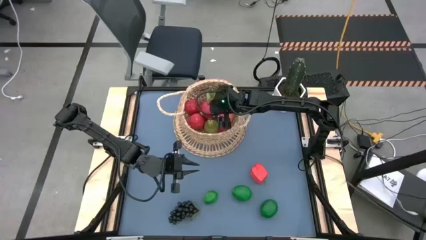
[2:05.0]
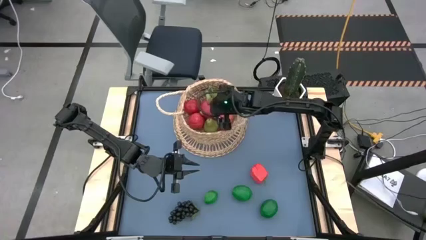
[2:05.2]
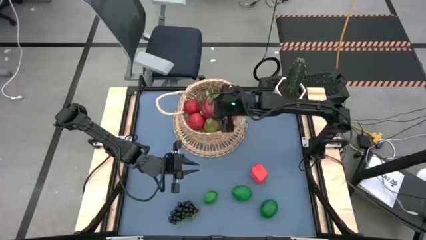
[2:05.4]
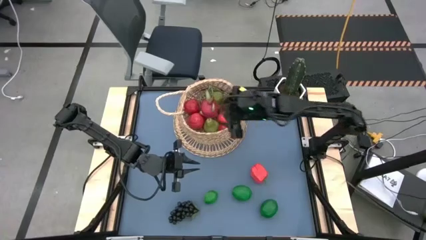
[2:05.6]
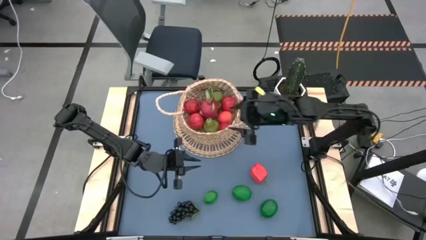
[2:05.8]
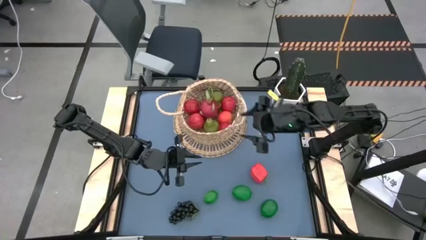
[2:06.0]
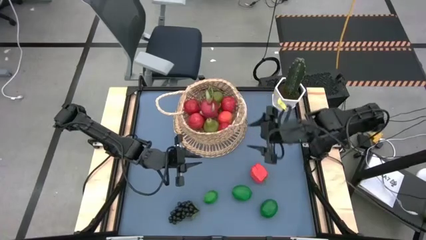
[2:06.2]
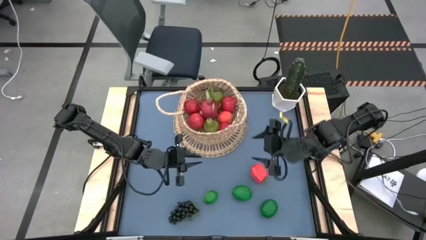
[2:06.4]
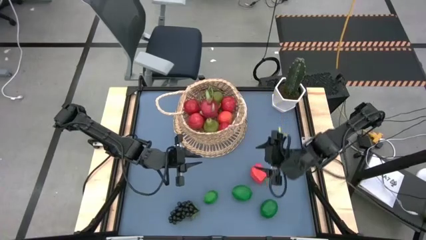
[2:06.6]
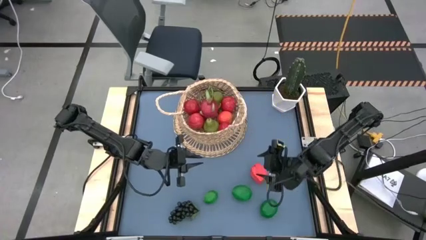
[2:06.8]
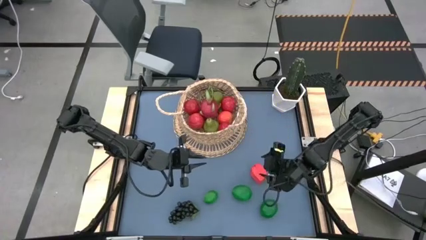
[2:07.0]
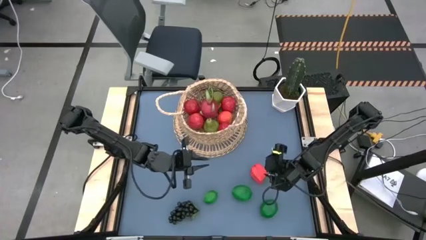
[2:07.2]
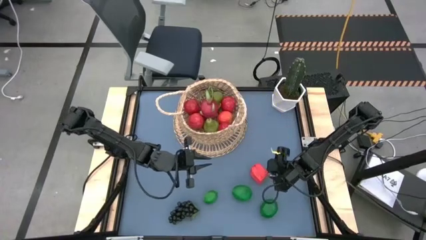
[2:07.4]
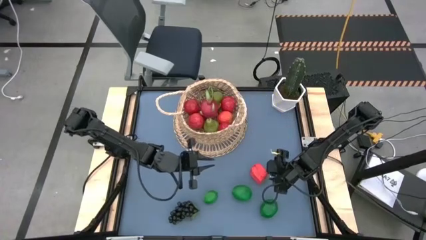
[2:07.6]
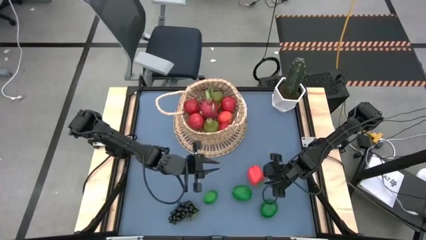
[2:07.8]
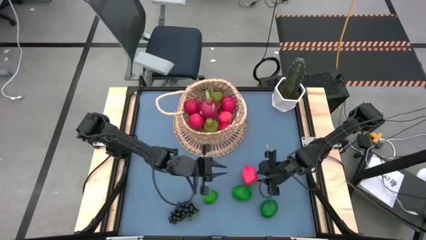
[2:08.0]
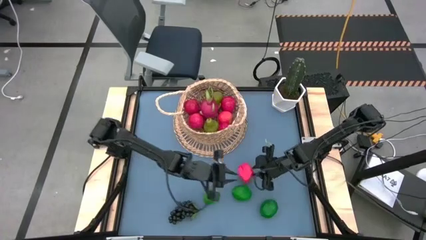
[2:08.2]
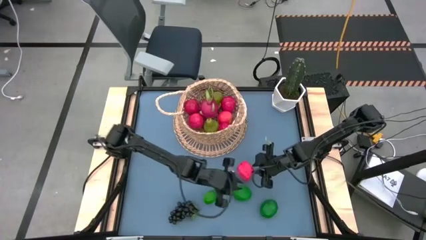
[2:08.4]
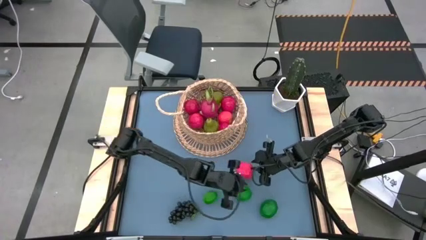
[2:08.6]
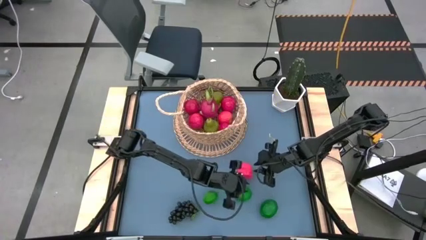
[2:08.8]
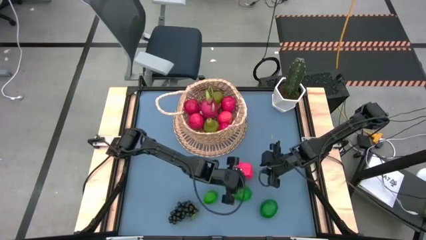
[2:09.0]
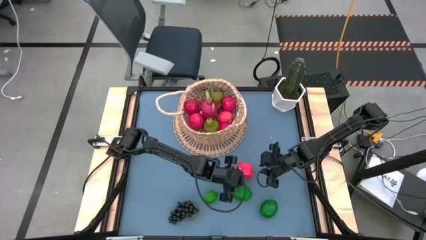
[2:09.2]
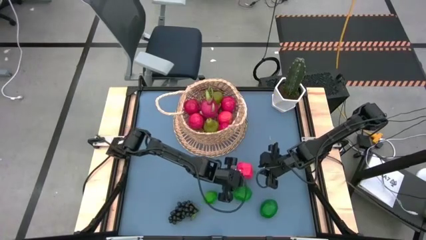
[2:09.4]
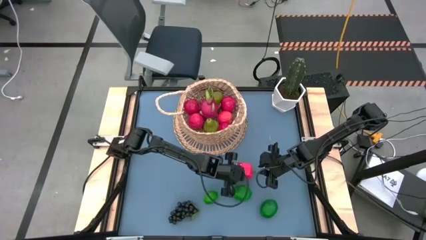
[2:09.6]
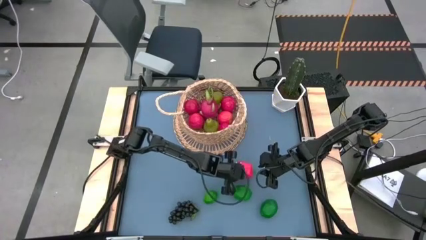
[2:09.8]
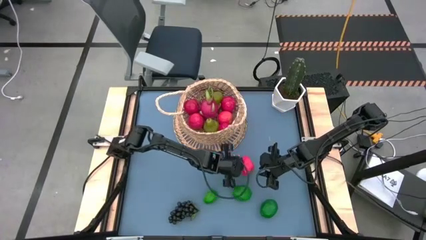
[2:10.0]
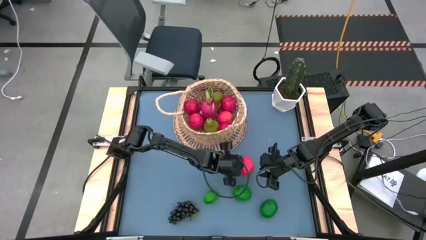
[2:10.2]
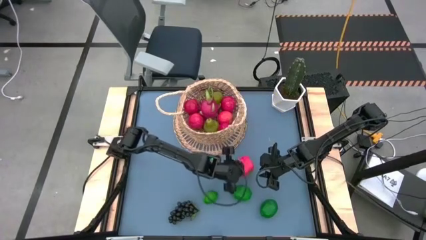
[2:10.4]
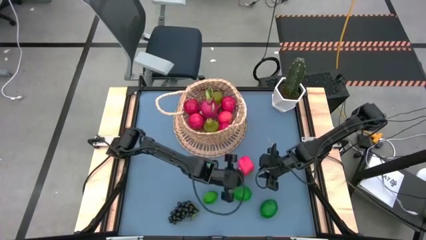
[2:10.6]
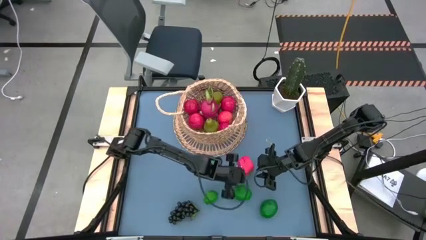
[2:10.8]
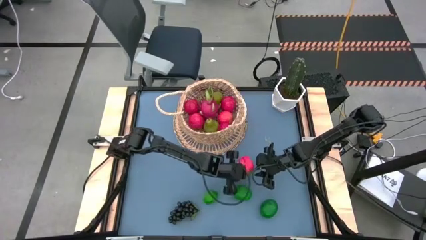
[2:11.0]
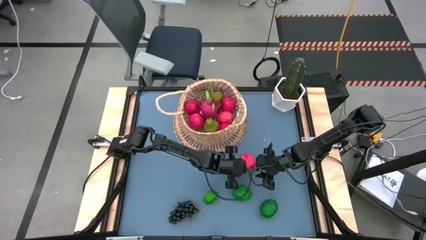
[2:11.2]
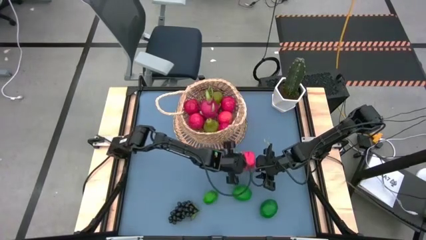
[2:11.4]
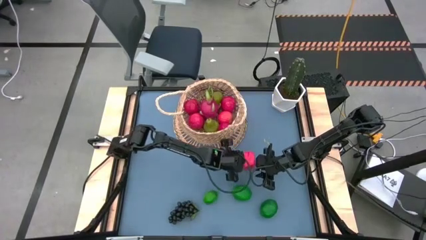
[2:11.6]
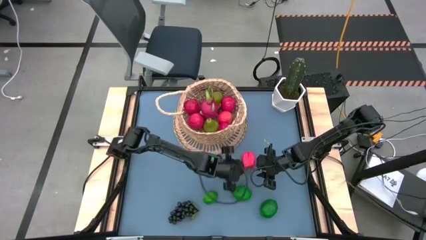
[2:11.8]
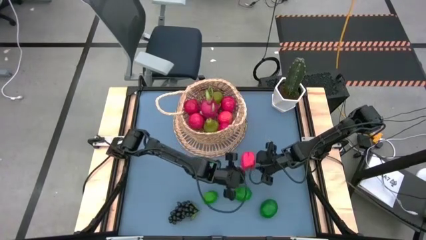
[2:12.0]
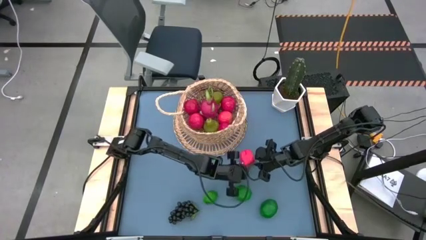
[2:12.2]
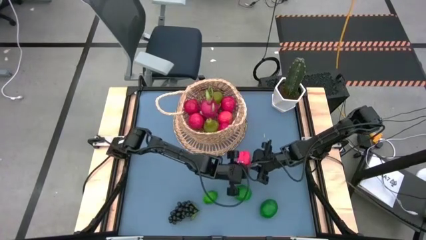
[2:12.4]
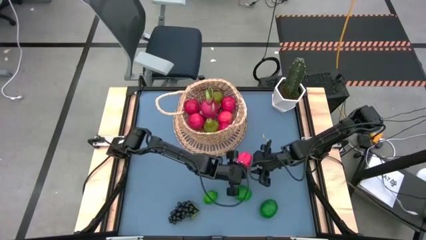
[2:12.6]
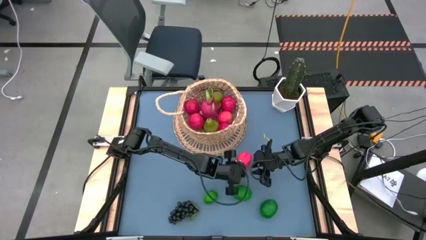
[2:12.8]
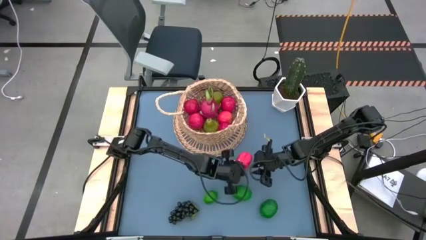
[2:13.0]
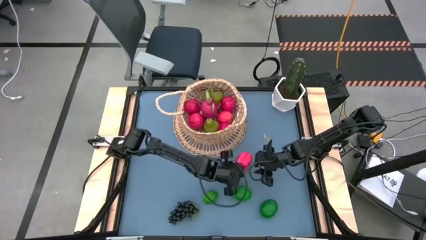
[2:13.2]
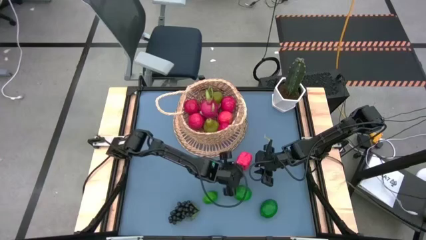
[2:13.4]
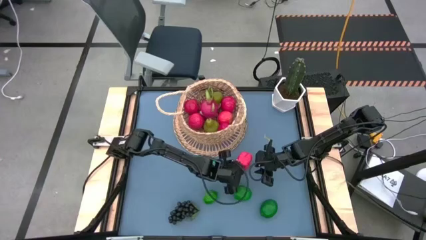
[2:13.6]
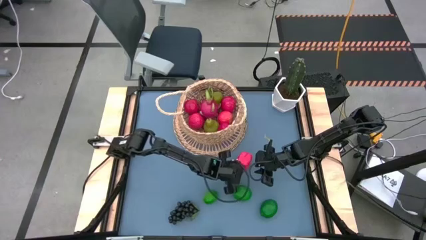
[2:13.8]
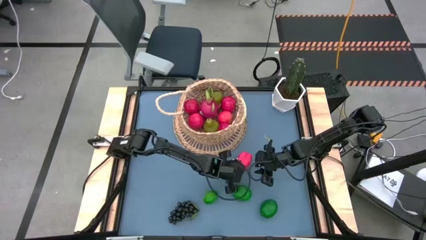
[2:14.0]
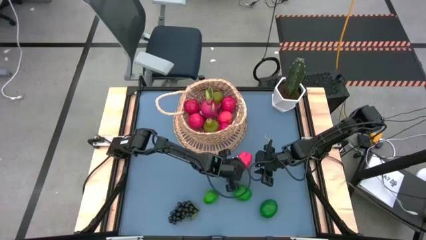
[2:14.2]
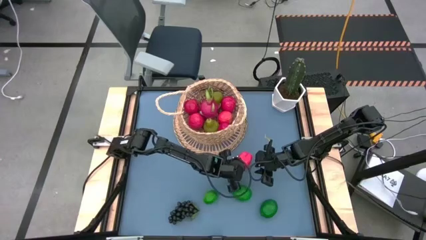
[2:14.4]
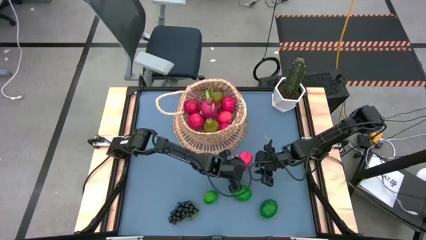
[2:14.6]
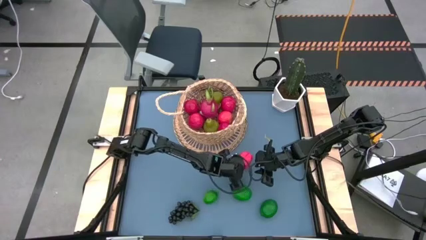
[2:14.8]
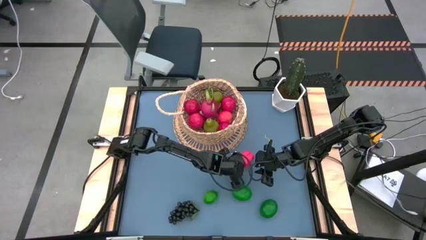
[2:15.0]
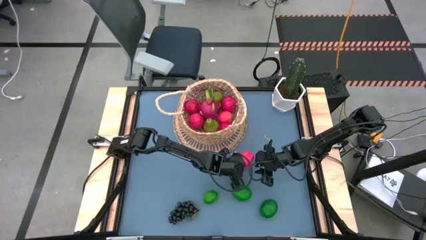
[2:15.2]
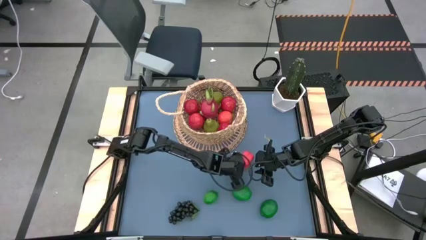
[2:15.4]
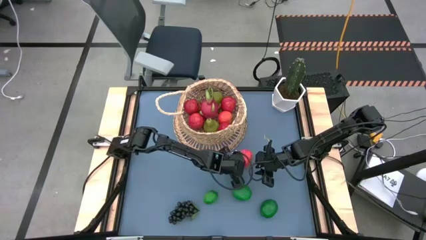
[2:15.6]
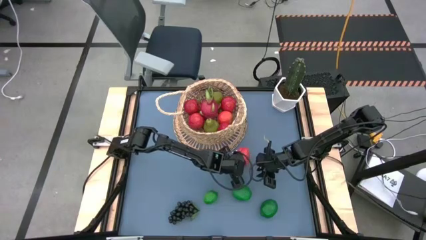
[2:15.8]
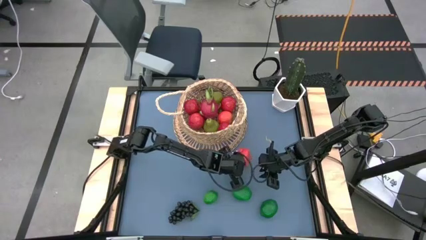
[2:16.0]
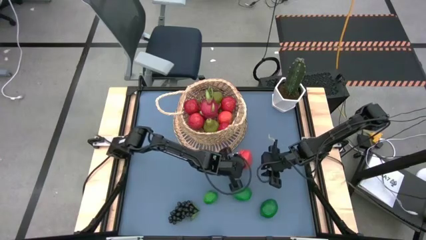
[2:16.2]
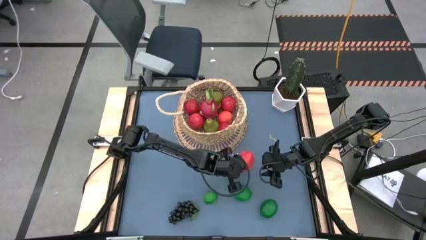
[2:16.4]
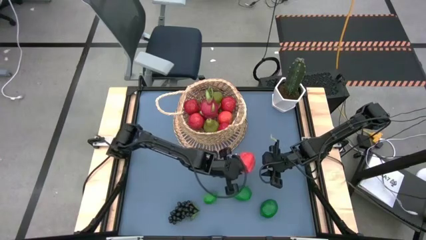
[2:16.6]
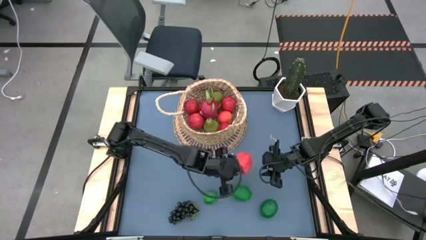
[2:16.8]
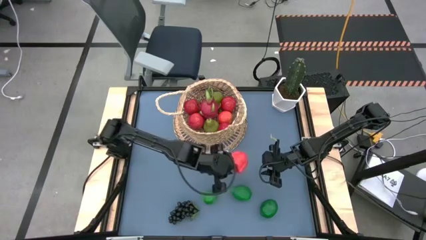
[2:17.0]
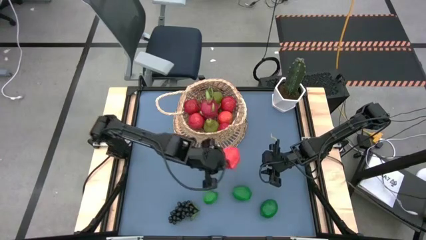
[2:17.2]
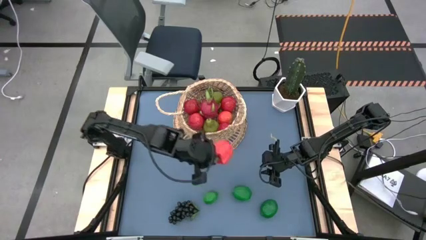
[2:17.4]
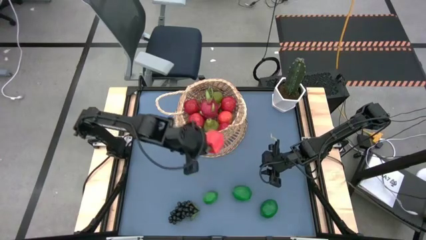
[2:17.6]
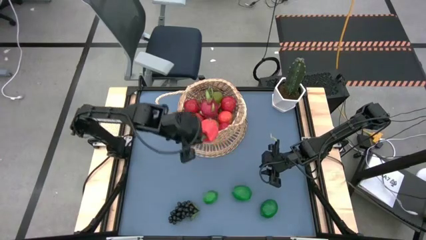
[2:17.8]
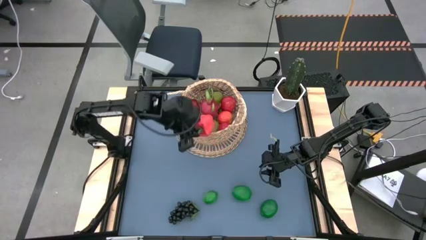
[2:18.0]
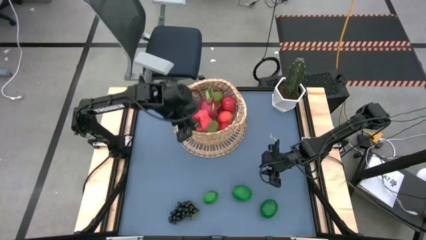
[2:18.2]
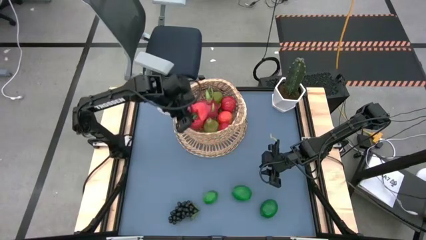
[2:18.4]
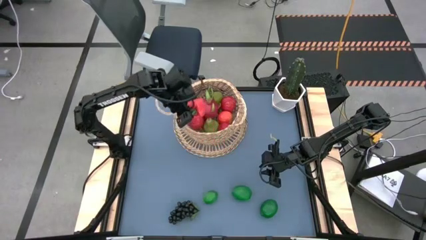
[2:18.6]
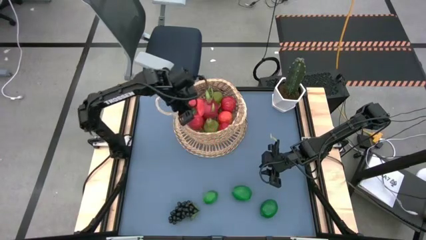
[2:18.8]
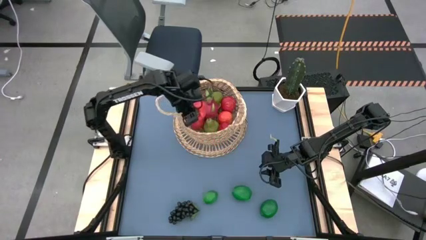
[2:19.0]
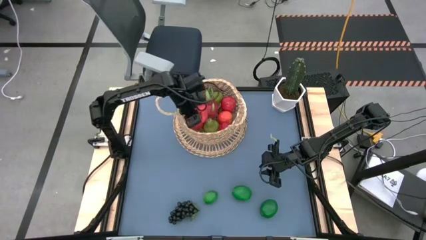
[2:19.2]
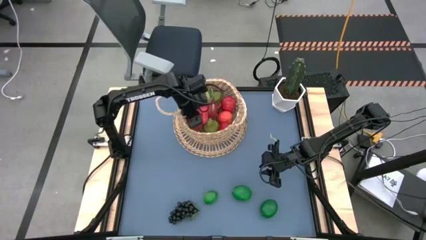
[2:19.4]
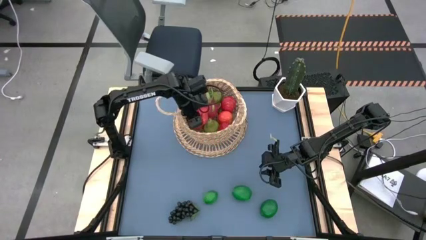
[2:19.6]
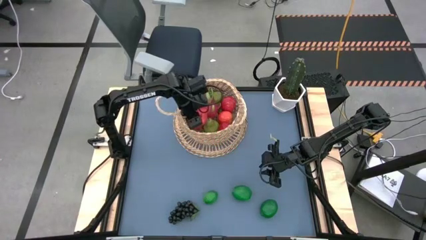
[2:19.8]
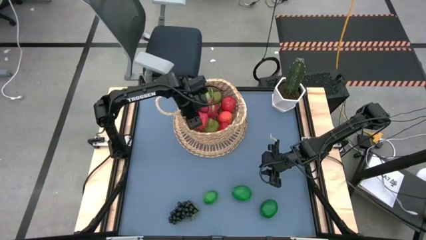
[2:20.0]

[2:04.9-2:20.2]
Task: Build produce basket
Put the bell pepper into the basket
